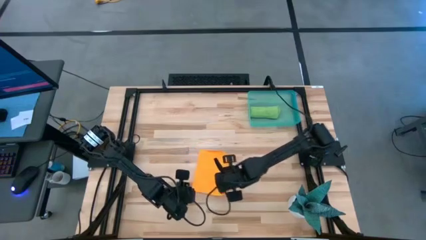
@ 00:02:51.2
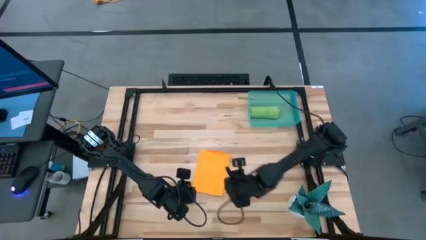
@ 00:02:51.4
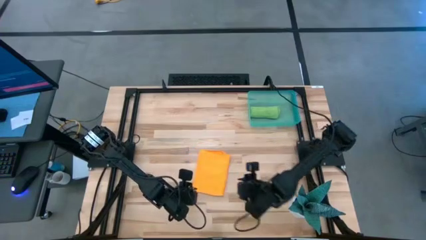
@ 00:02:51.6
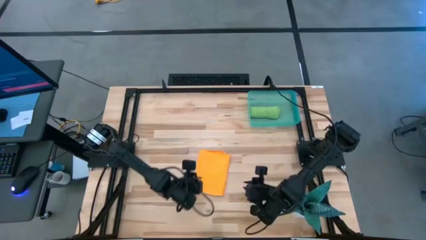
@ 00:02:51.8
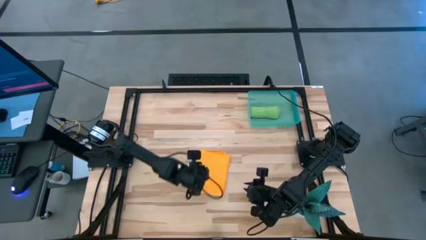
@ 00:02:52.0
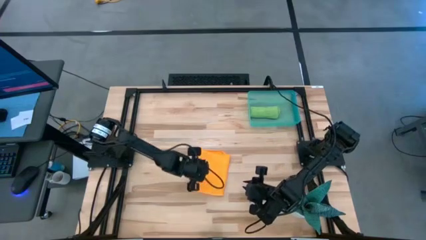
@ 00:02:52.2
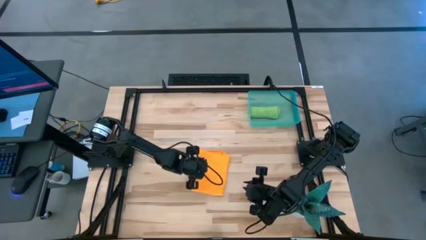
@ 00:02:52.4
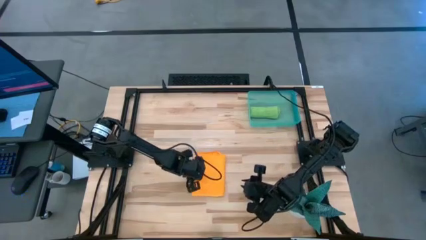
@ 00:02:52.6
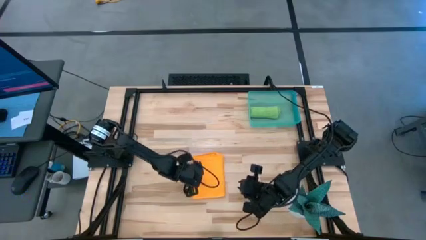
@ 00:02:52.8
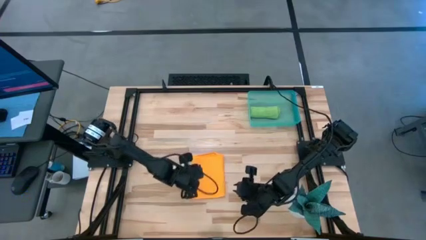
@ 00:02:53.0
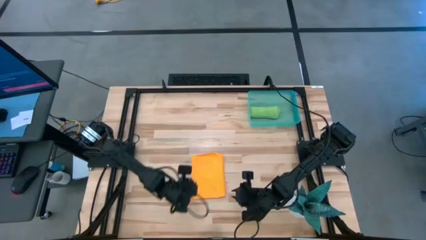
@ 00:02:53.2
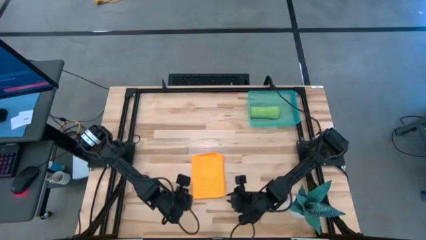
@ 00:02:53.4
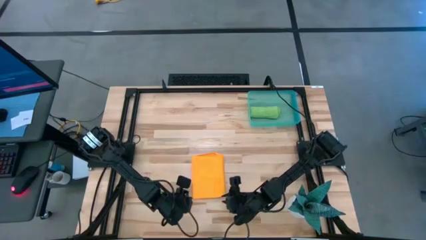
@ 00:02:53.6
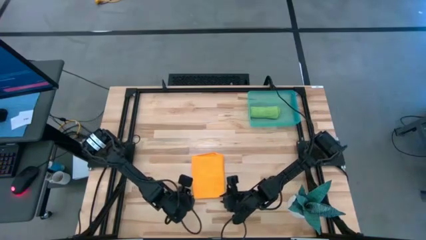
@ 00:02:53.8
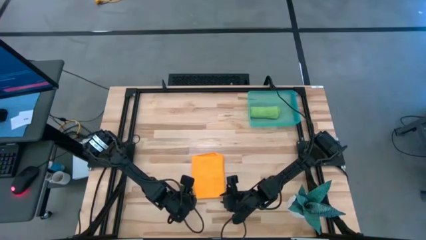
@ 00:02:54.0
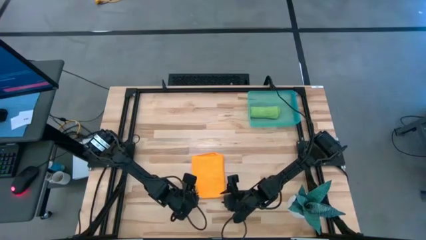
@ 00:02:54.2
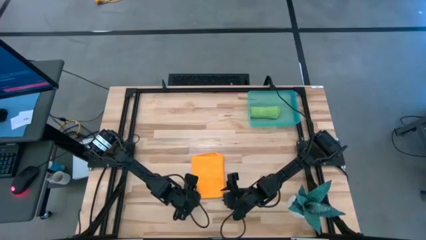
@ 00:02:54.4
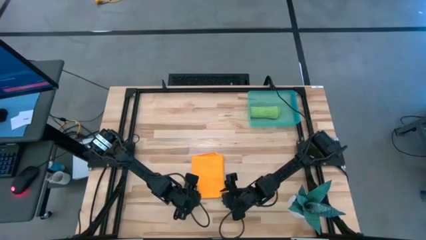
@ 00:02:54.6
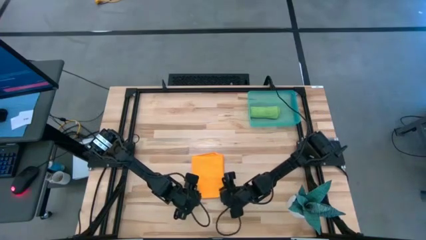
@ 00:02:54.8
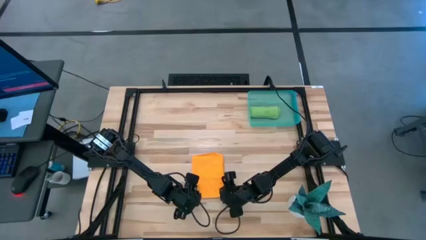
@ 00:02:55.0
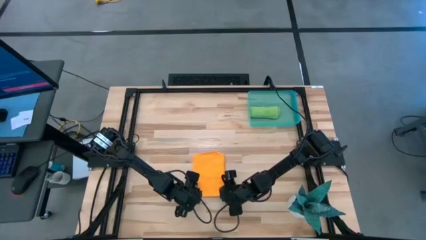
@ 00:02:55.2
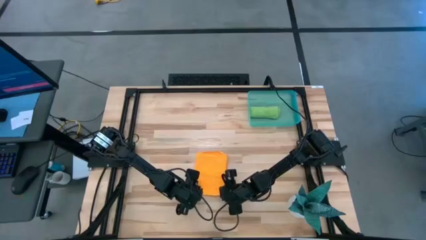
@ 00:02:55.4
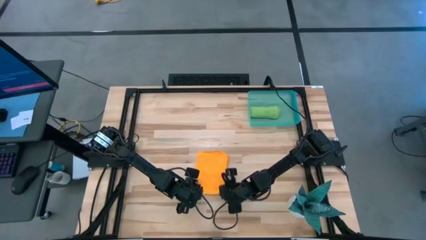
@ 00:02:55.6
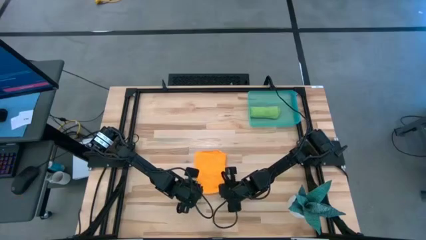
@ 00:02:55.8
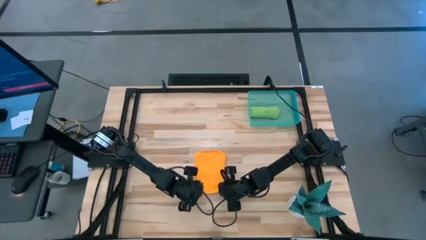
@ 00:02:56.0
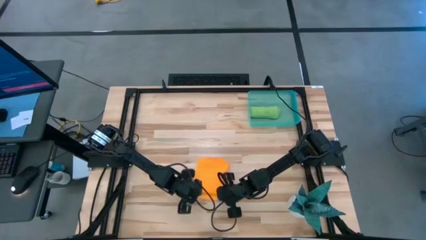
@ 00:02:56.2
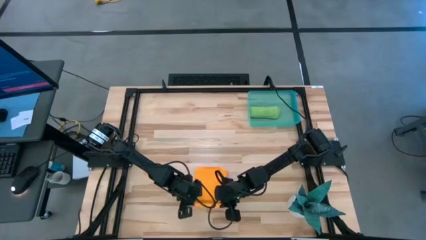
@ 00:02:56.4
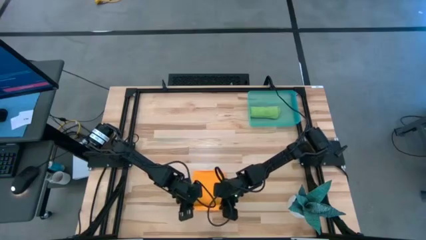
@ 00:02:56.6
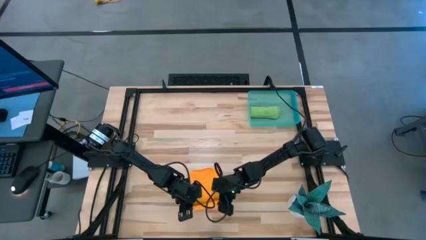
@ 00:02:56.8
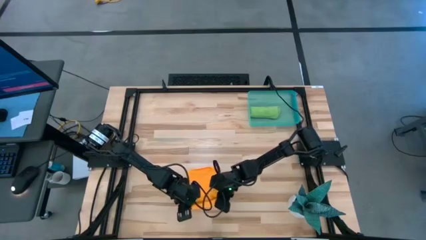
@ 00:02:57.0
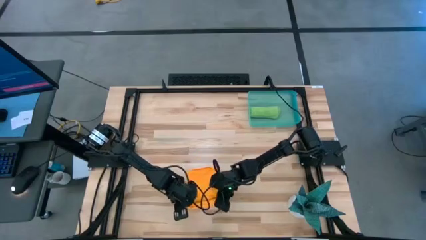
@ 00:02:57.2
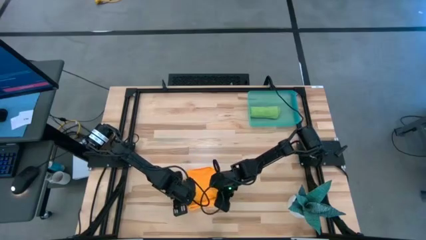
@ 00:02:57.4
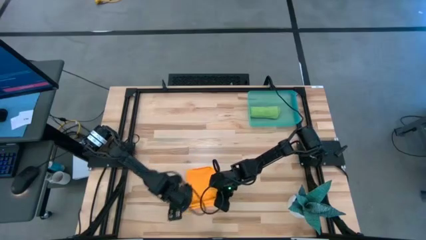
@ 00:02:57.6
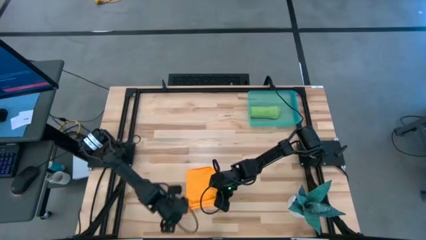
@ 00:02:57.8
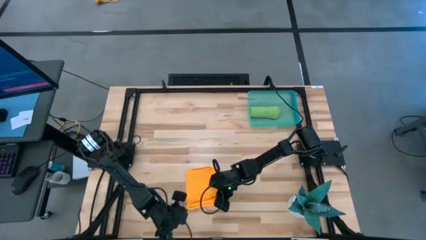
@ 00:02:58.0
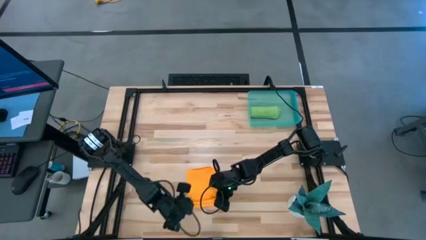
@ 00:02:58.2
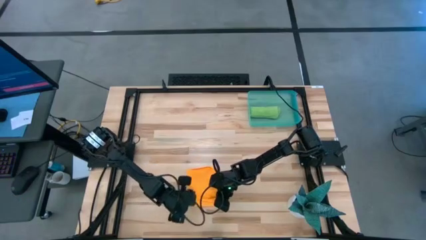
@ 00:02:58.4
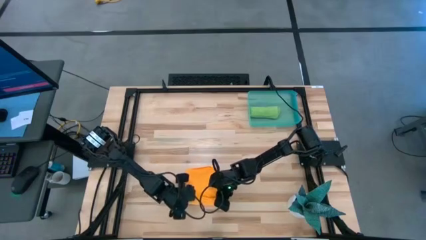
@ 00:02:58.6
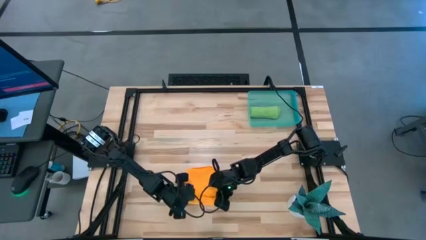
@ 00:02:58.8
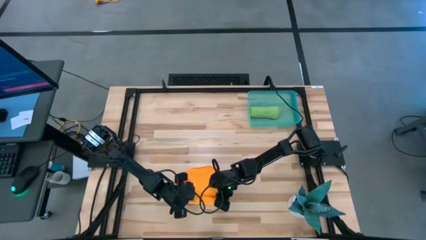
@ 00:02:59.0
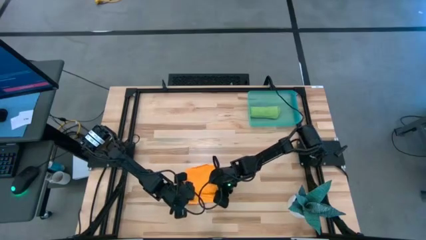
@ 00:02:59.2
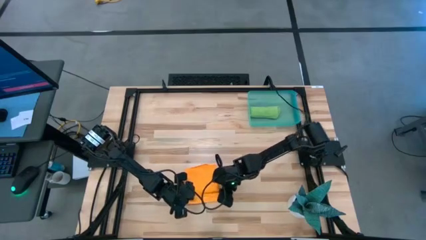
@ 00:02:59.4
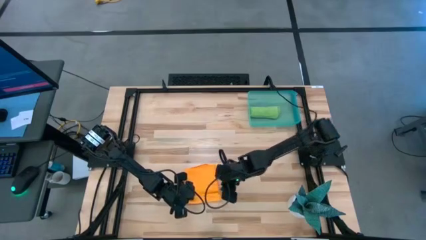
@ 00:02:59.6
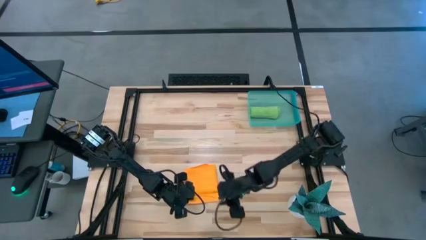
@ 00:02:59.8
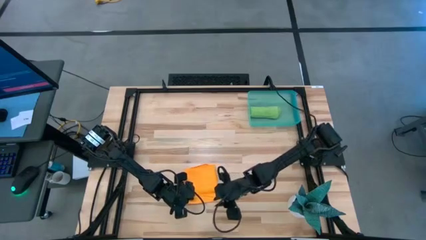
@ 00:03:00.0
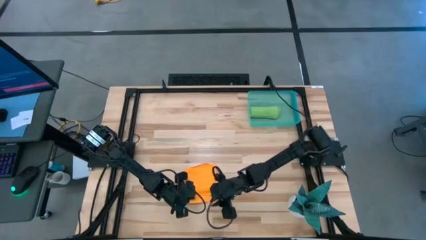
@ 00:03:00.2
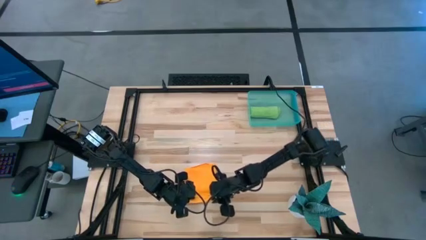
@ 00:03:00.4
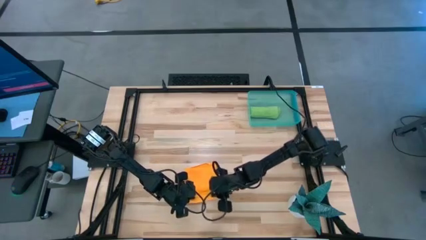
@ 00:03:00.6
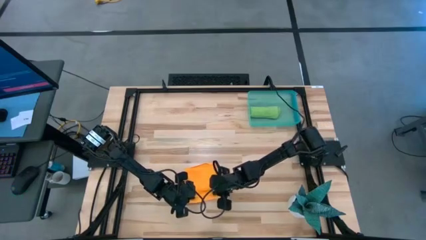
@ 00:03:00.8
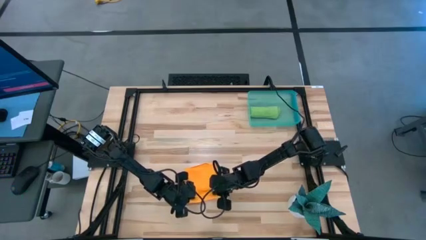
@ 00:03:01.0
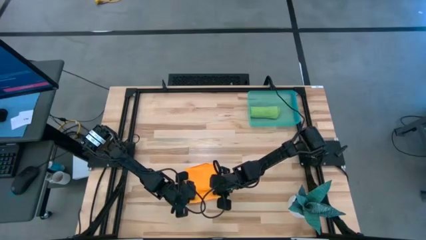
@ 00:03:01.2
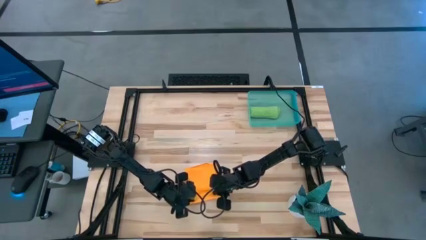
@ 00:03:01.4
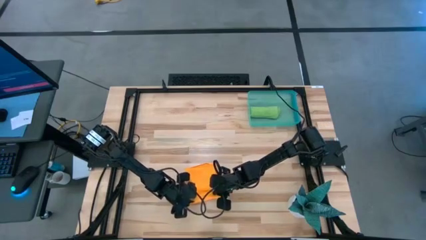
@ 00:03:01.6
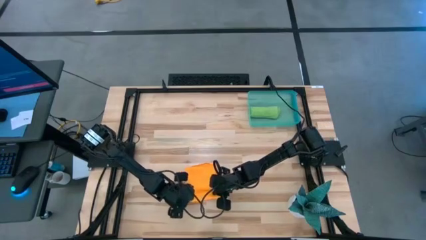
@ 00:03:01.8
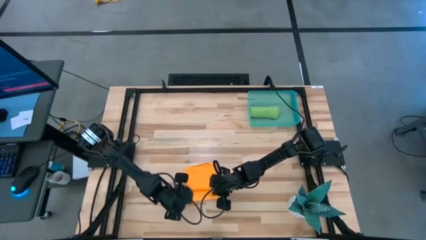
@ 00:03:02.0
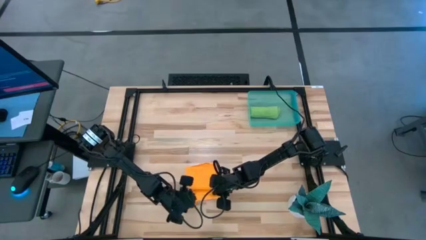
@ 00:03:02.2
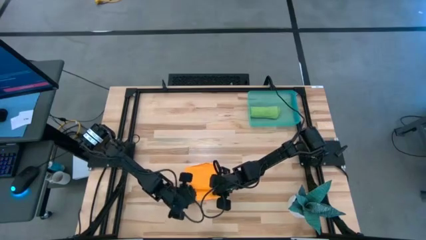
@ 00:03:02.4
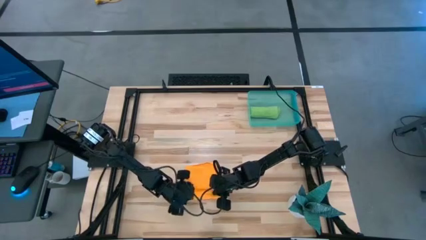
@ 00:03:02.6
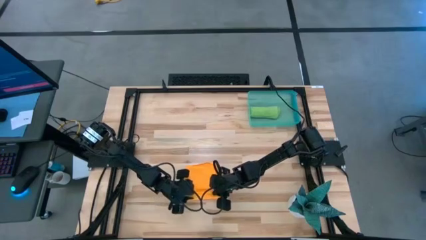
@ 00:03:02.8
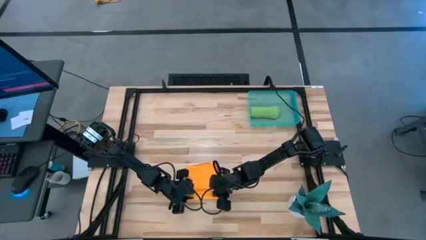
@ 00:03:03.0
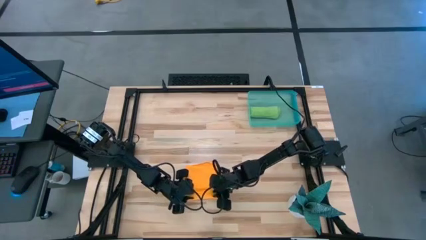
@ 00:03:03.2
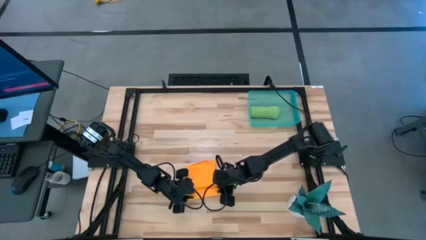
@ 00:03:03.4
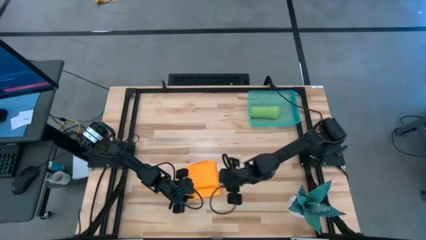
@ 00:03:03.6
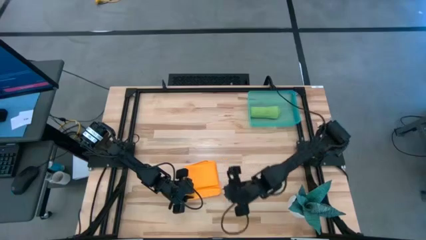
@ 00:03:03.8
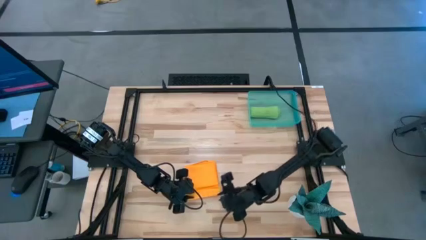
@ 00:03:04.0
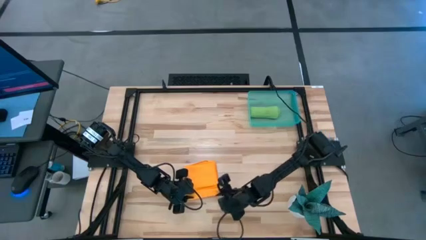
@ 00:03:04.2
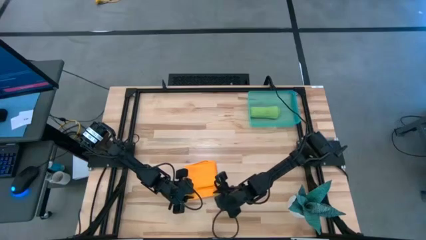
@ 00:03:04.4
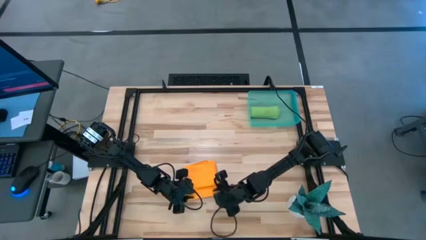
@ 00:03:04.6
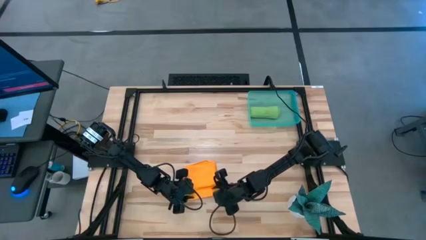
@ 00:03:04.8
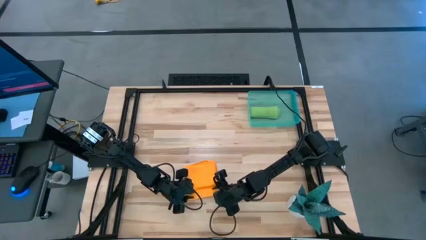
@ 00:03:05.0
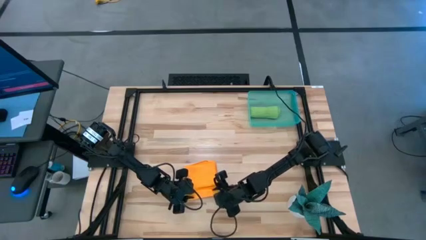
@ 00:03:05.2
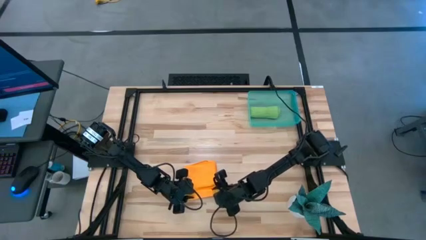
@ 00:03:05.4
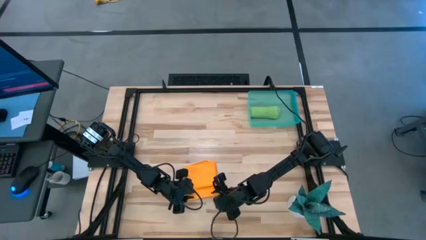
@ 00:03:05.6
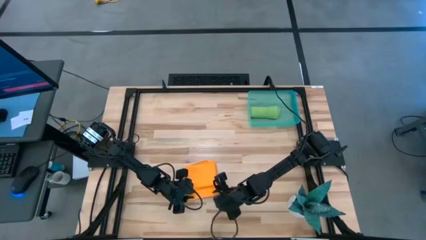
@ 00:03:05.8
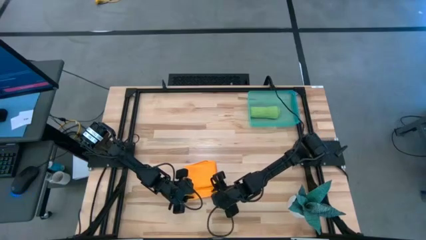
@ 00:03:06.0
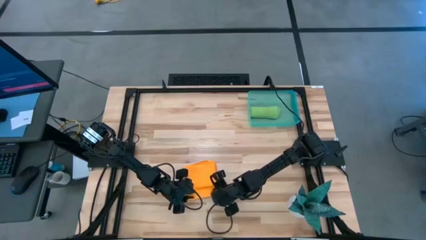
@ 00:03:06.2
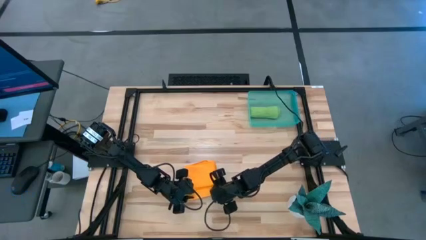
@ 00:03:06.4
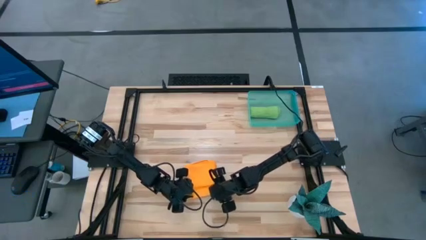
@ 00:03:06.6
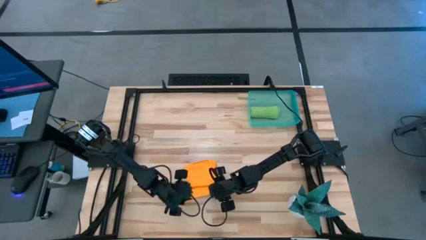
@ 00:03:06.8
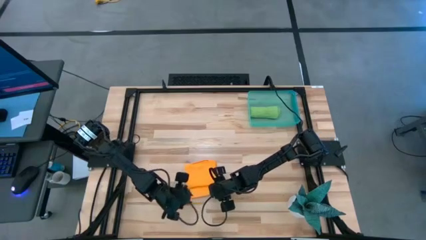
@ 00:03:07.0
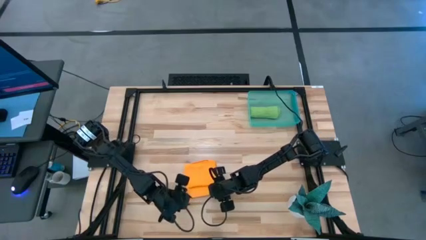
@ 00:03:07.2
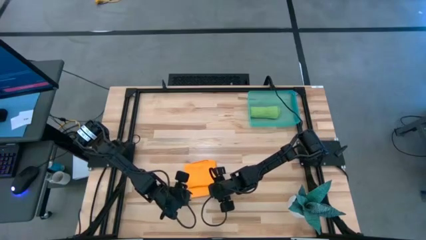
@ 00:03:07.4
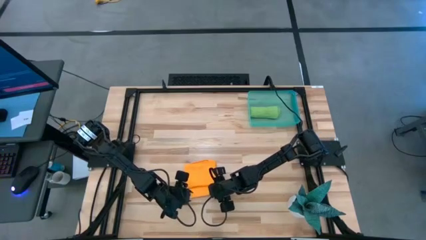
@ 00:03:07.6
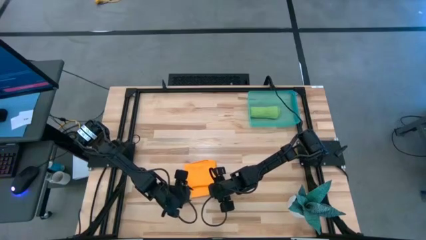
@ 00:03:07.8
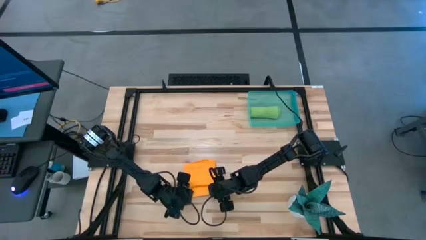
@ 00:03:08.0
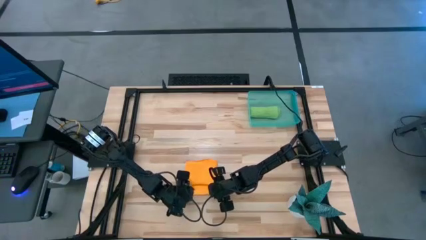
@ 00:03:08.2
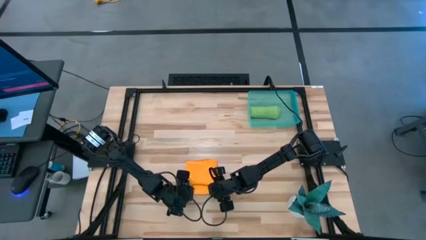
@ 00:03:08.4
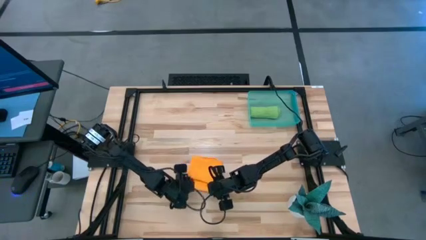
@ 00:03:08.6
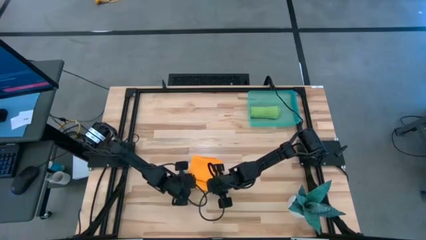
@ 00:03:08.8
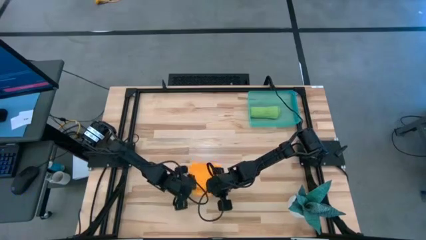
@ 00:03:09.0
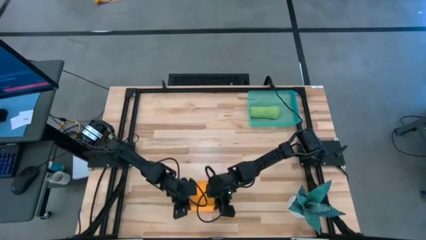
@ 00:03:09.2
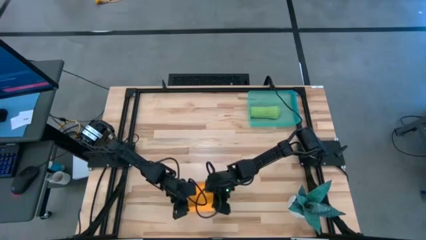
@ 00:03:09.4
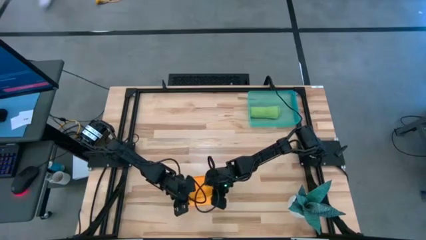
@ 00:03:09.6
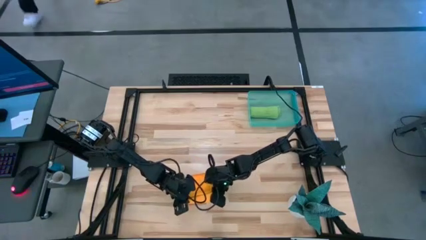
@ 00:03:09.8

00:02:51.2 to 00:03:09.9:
Task: Roll microfiber towels into tight, uniform cylinder then place into a basket
Roll the orange microfiber towel
